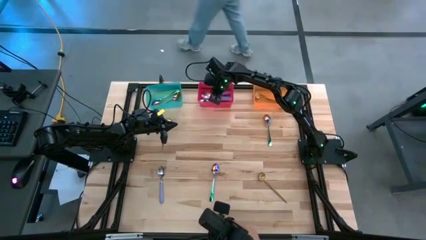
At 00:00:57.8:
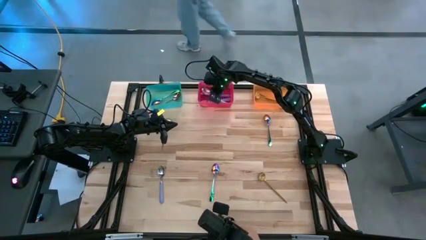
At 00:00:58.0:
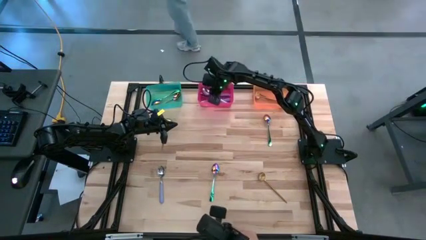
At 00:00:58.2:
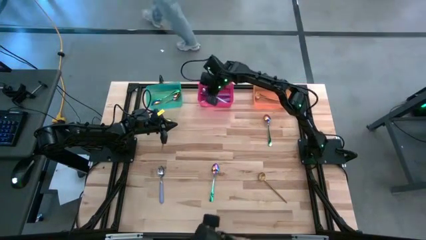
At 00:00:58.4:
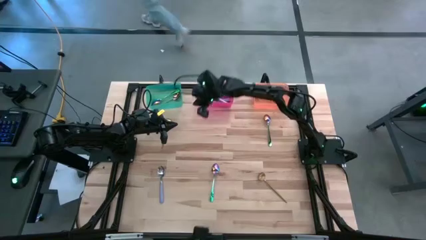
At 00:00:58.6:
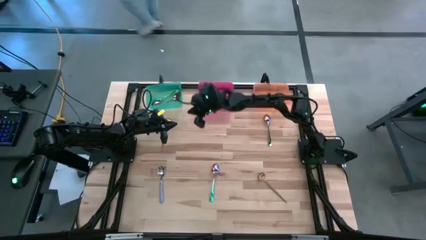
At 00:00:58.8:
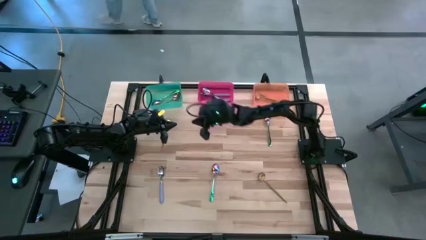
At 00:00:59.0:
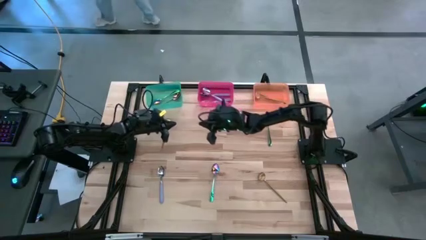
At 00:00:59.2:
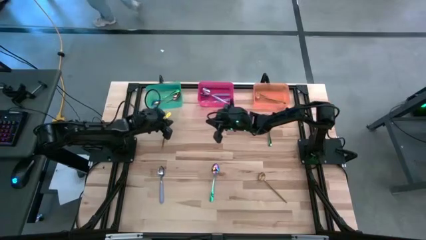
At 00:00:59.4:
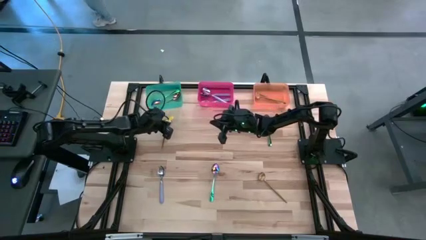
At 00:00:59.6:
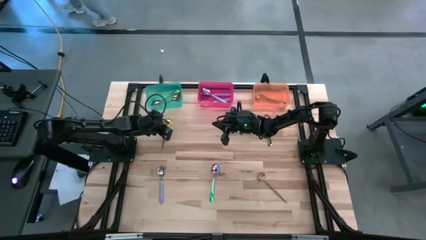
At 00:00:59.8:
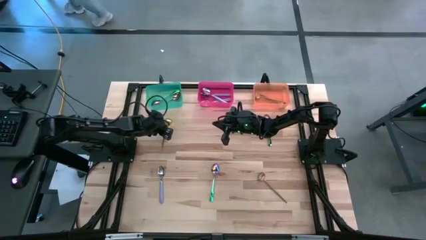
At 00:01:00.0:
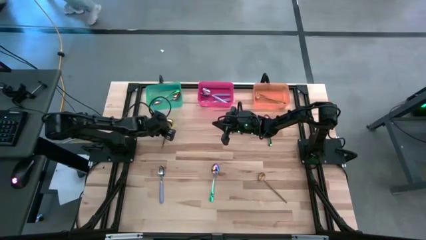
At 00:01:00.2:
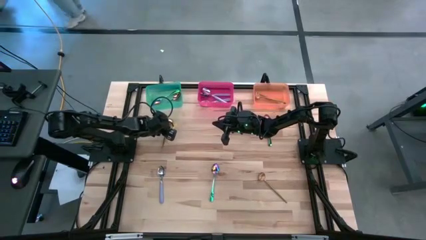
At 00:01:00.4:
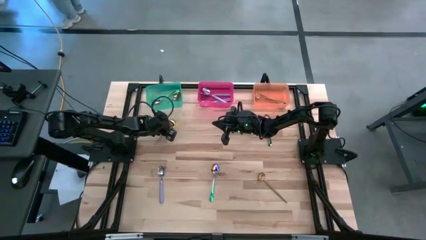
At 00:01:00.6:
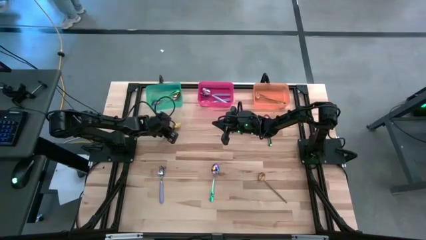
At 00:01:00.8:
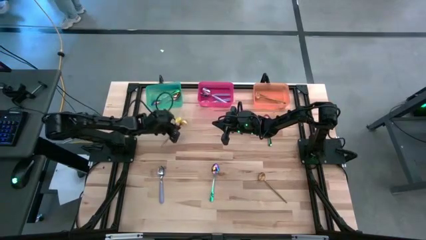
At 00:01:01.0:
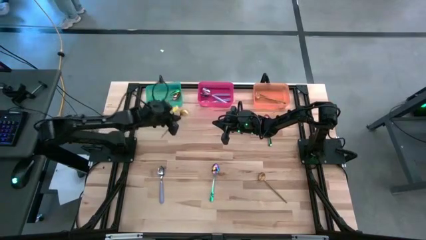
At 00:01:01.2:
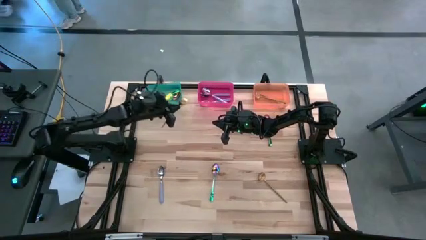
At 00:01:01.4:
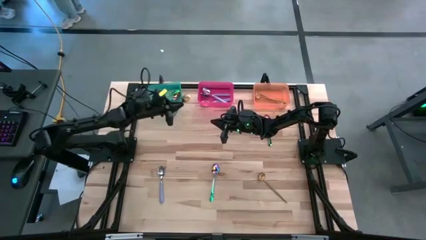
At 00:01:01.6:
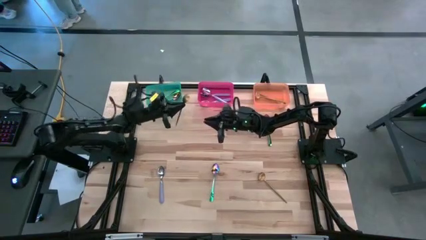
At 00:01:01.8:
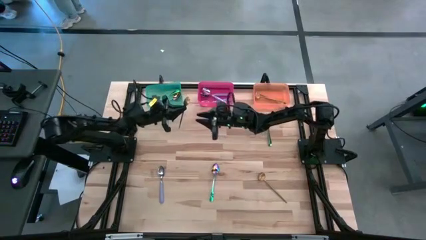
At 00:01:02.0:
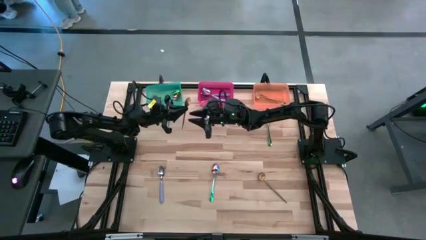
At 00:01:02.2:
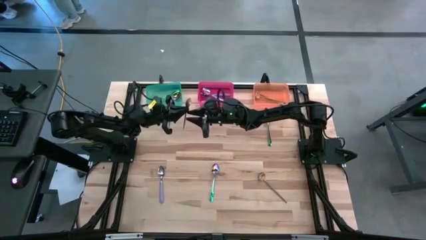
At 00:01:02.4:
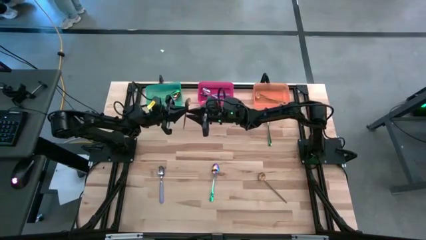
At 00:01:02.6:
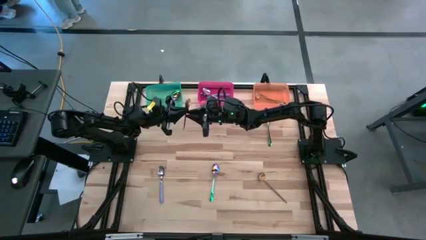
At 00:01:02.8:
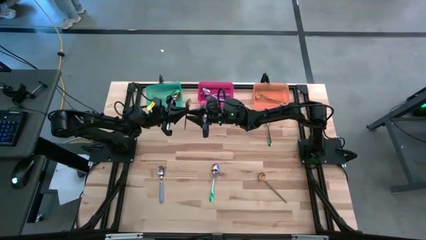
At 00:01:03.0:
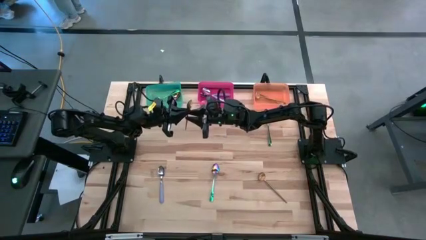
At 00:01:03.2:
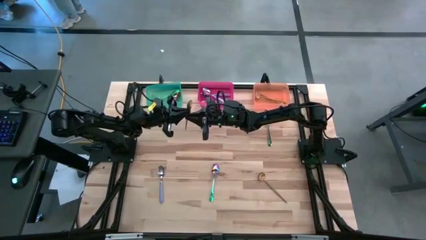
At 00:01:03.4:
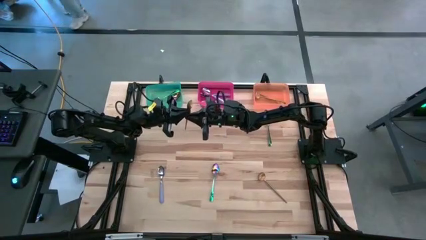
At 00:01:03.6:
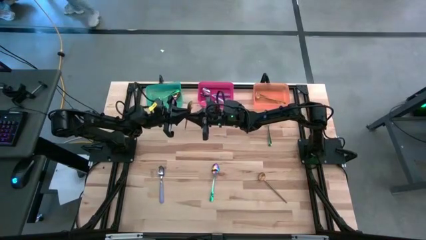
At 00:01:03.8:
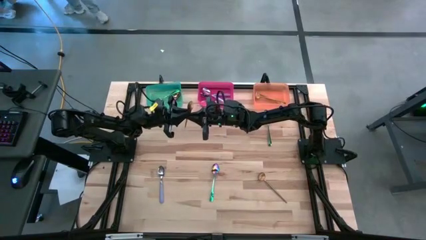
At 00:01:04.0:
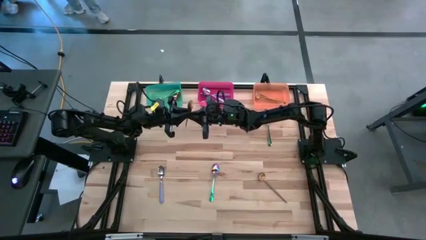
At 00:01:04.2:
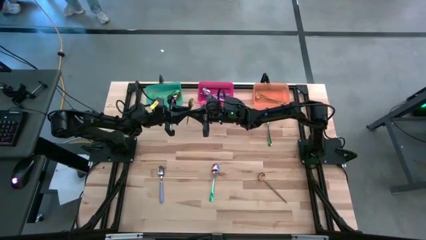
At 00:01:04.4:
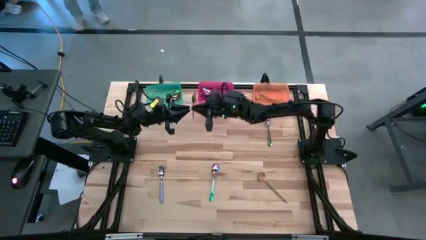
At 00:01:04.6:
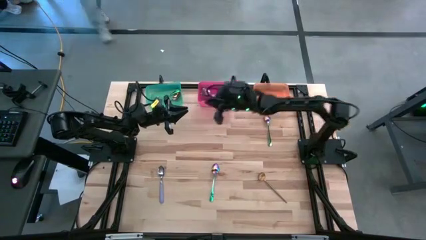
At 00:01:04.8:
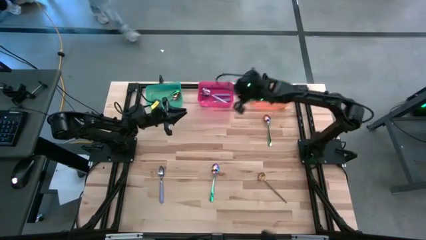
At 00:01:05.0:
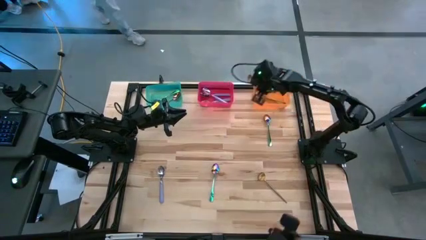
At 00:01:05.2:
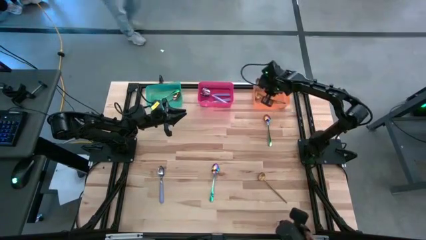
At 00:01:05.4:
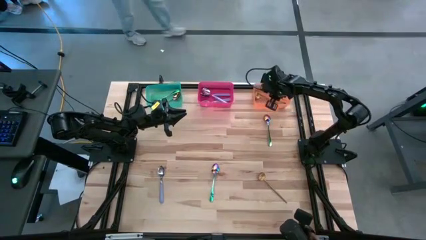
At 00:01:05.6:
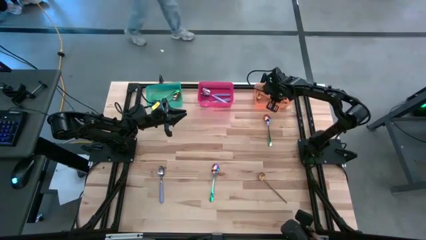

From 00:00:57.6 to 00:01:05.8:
Task: Sort silverware by color (type)
Put the gold spoon into the orange bin

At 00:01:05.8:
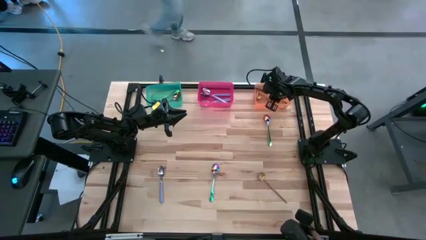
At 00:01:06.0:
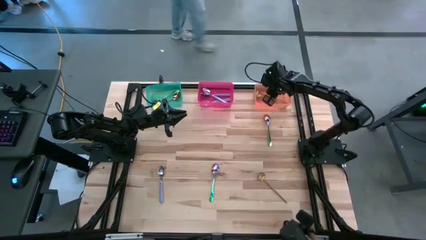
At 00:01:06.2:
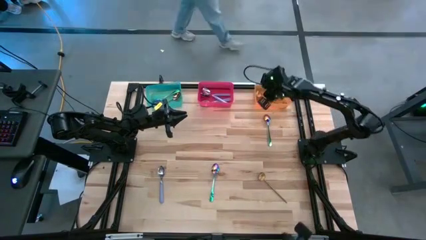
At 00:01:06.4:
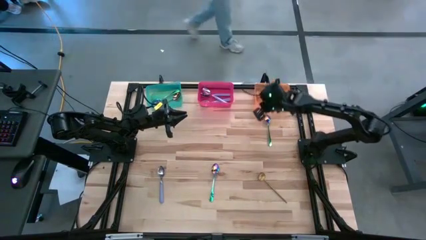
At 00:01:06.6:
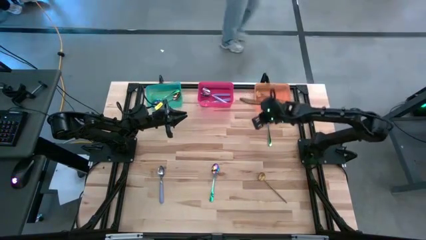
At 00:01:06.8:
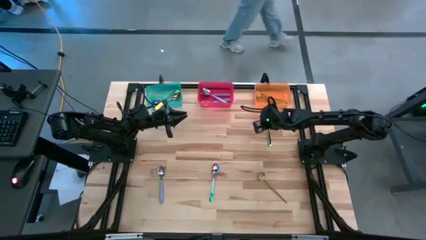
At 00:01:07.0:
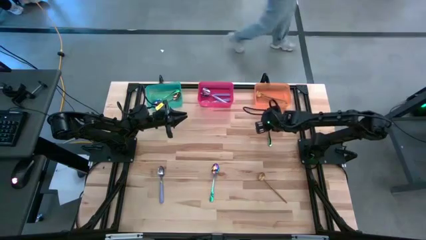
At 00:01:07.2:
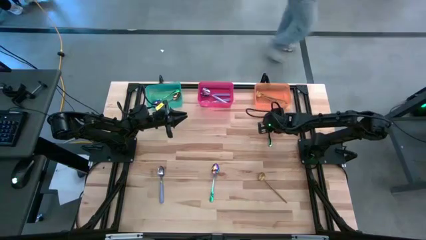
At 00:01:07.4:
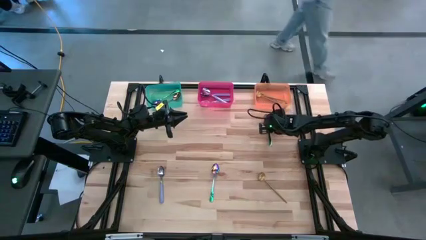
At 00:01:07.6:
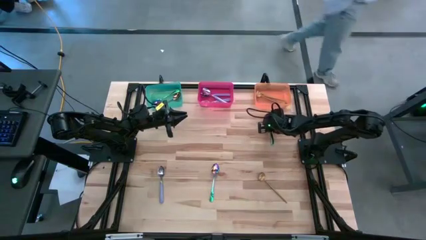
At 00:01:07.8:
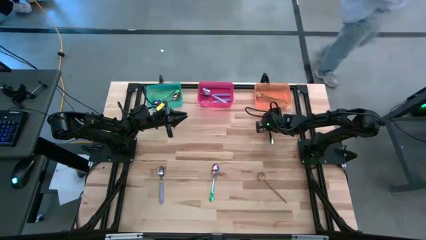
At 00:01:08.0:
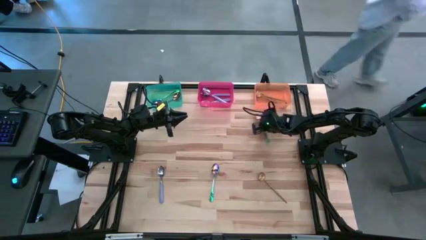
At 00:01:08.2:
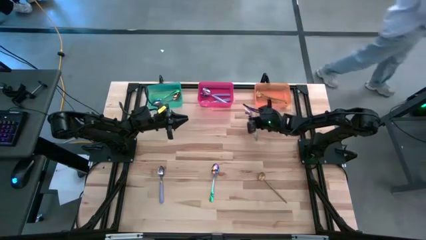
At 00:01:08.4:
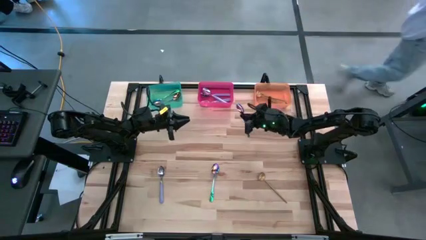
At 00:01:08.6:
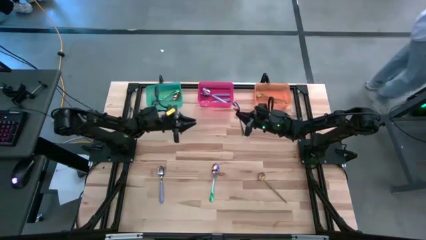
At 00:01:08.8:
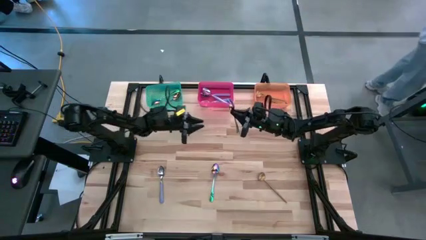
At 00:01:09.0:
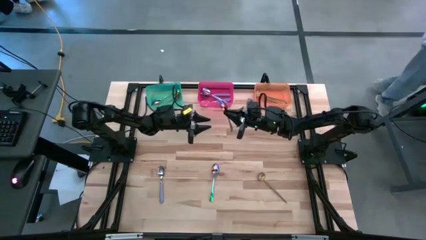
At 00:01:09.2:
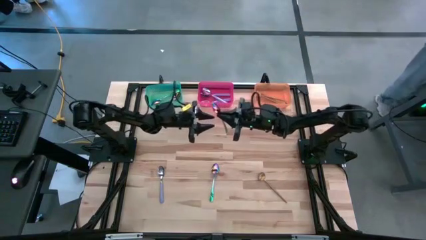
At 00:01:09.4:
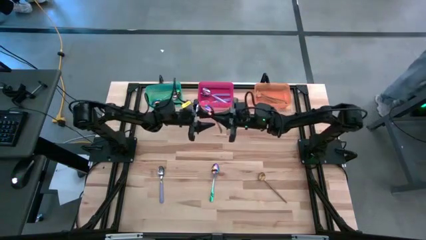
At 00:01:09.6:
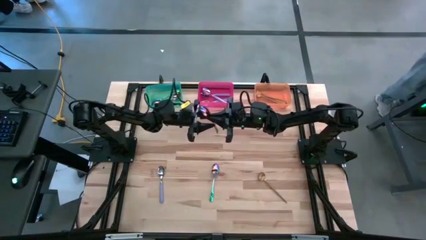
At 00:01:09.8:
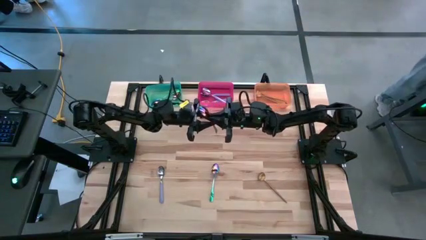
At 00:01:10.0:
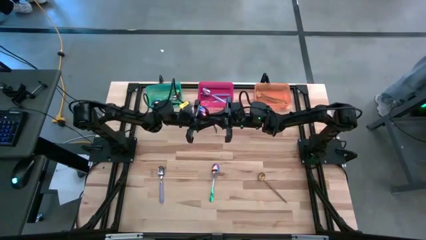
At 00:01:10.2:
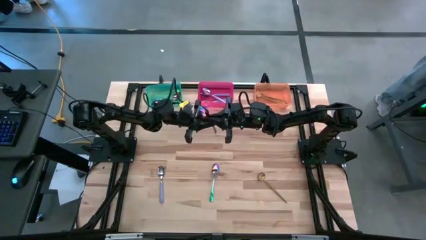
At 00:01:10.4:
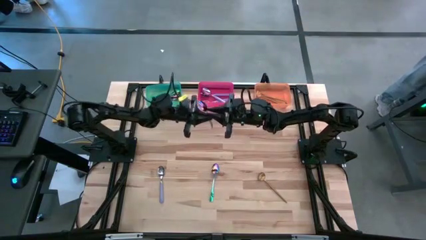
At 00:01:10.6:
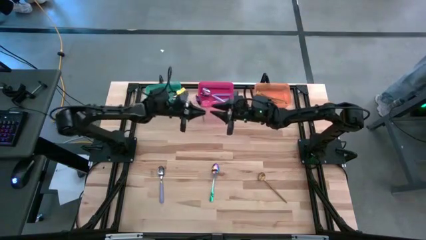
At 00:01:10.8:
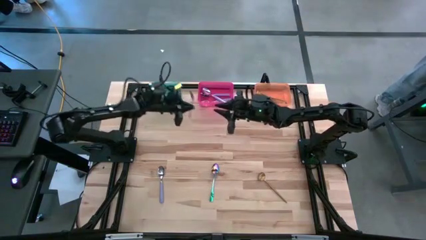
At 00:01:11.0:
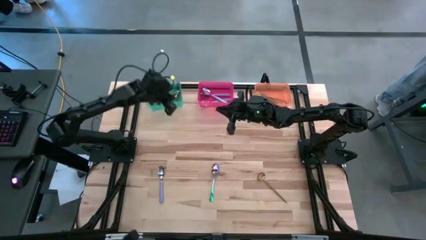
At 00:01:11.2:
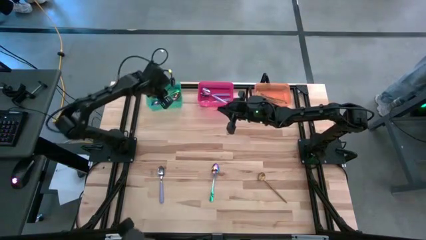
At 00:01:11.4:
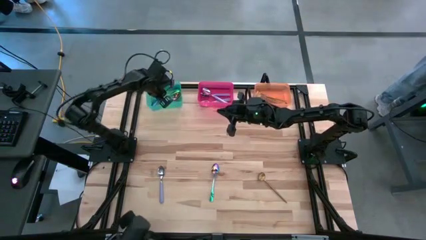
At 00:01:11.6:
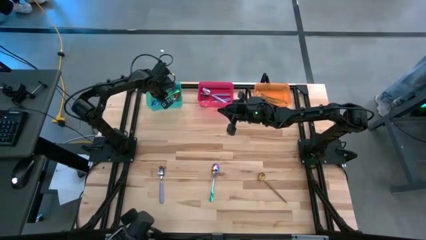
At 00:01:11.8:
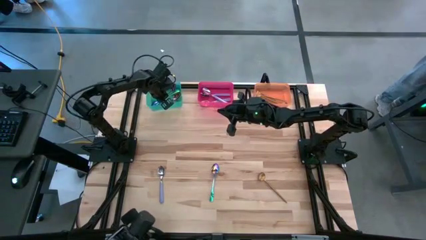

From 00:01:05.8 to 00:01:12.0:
Put the blue spoon into the green bin

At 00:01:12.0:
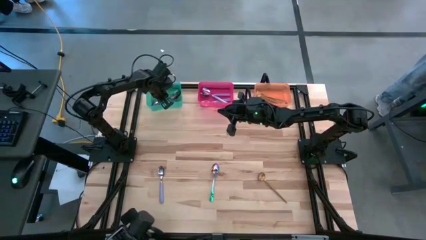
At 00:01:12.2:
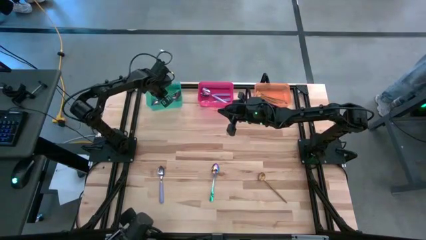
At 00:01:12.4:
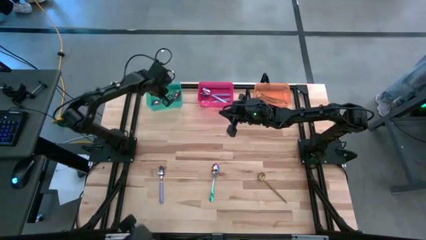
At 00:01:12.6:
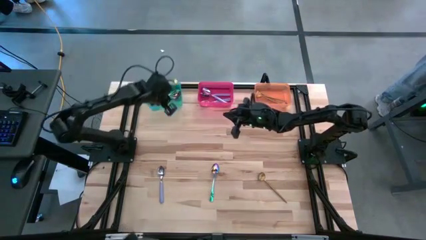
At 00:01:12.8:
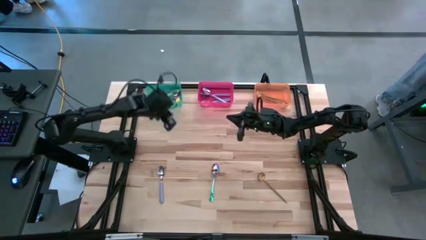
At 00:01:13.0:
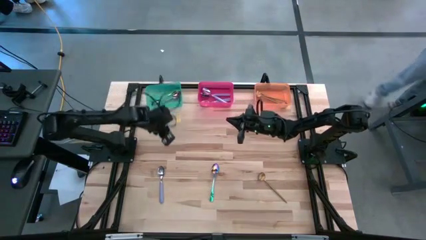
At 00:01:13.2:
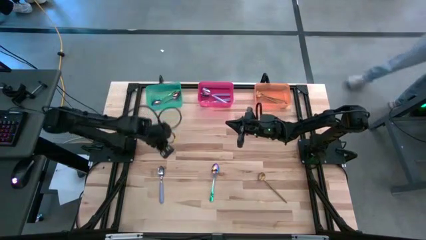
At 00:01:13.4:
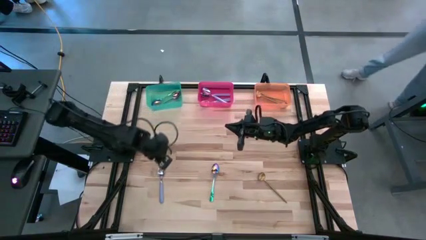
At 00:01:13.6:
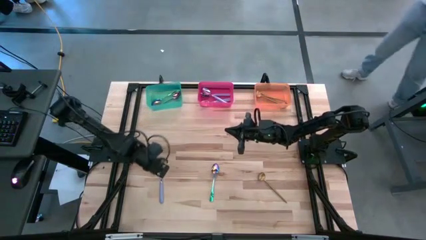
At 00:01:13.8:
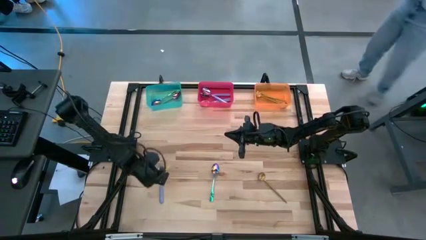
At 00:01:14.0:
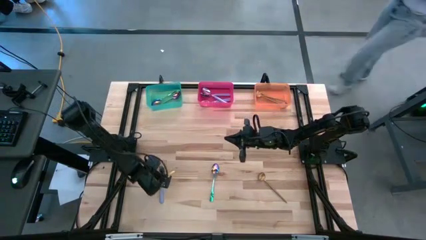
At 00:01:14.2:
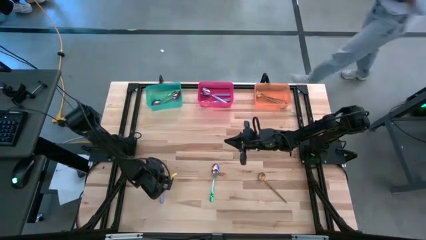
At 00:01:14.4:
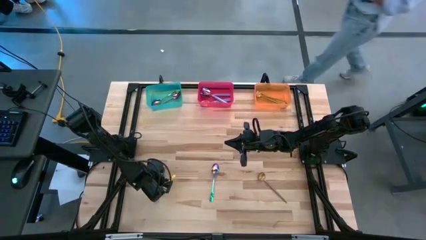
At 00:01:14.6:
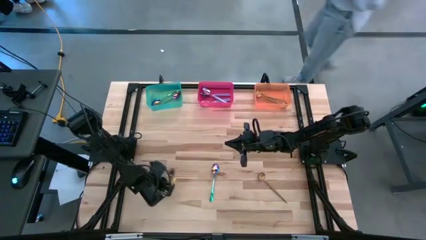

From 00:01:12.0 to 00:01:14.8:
Put the purple spoon into the red bin
